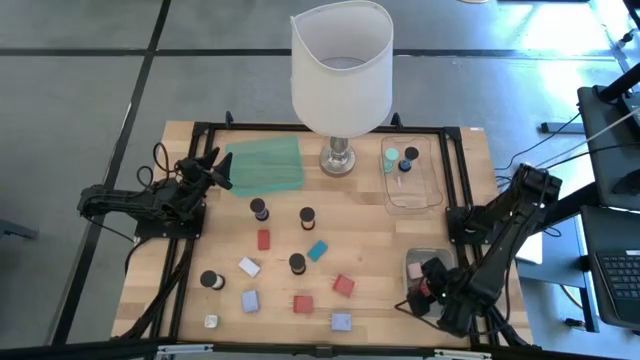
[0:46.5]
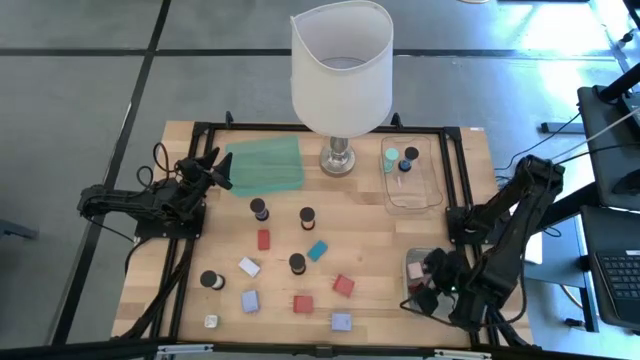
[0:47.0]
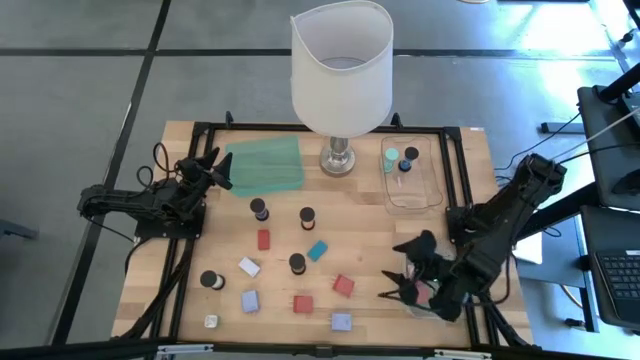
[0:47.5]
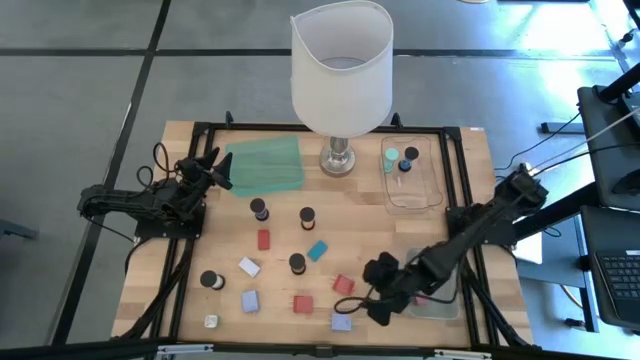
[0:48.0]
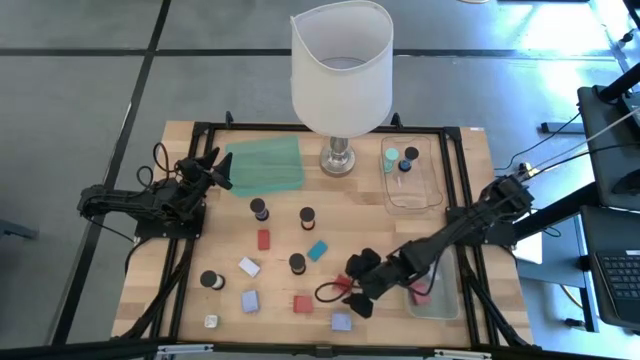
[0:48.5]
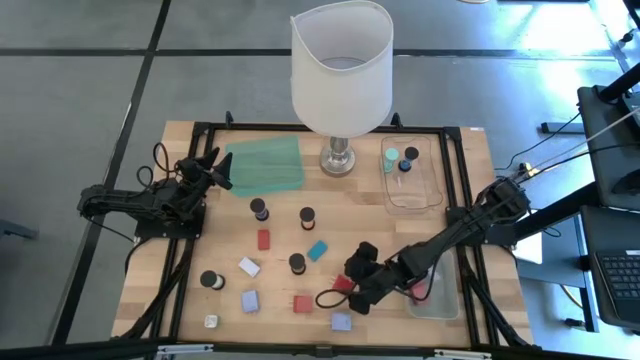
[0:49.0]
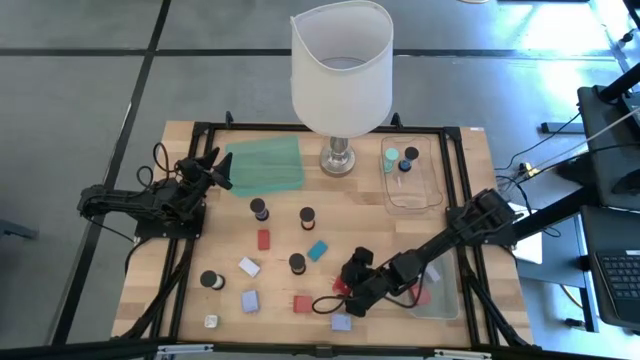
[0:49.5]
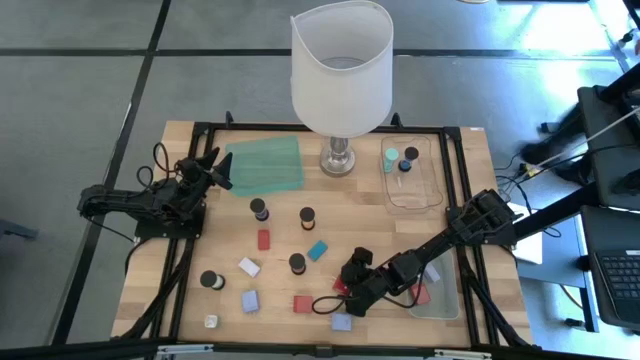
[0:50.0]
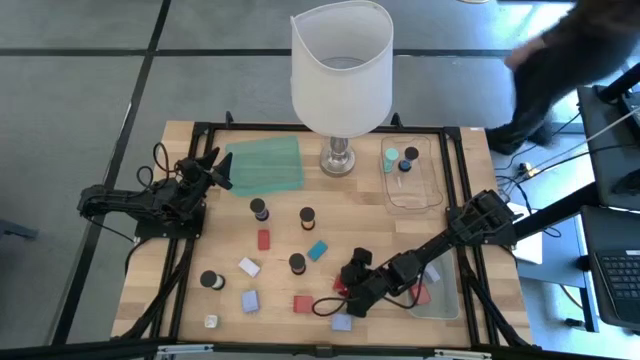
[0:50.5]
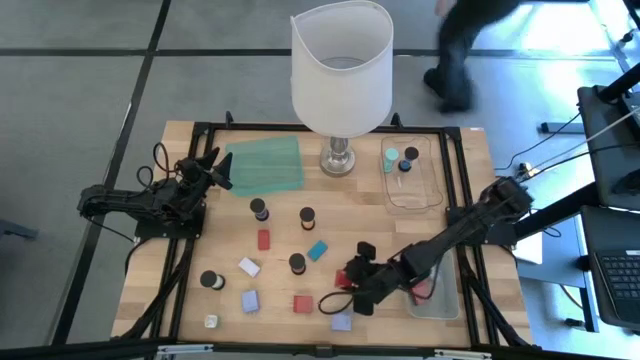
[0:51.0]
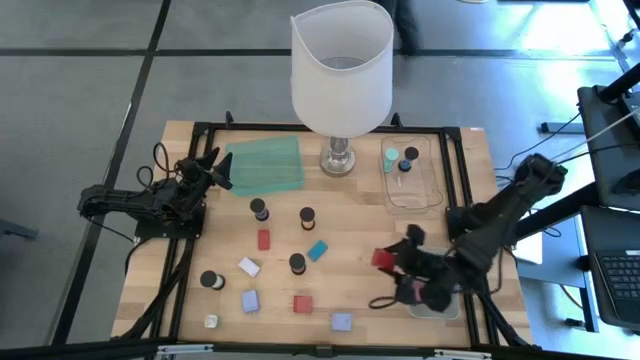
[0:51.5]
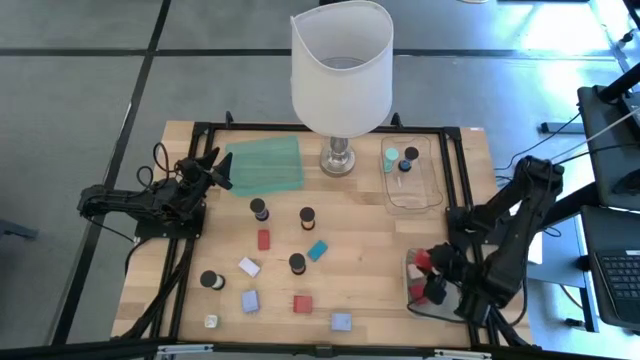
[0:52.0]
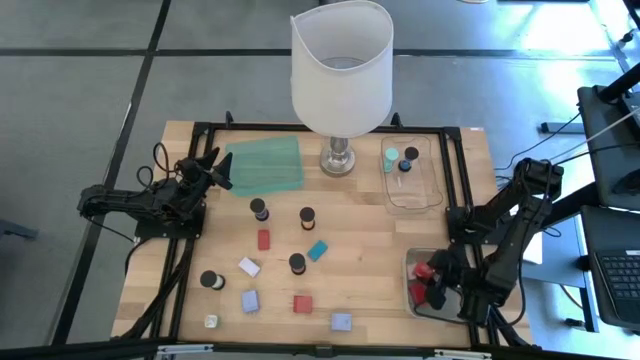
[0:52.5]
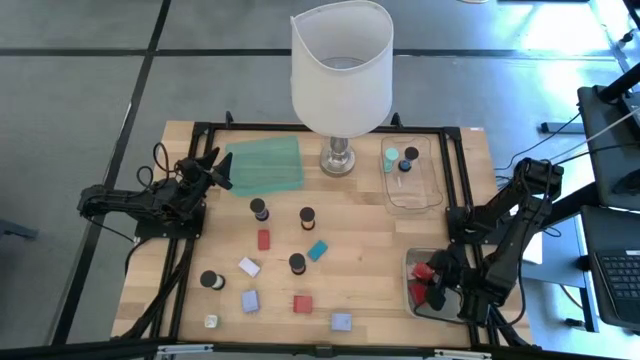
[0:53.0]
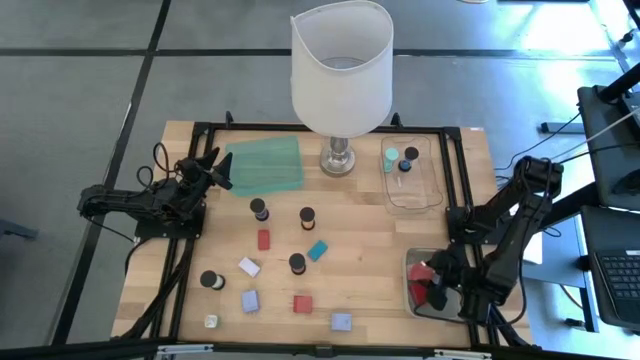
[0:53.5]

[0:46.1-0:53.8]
Task: Pick & Place Office items
Put the top red charger adapter into the gray bin

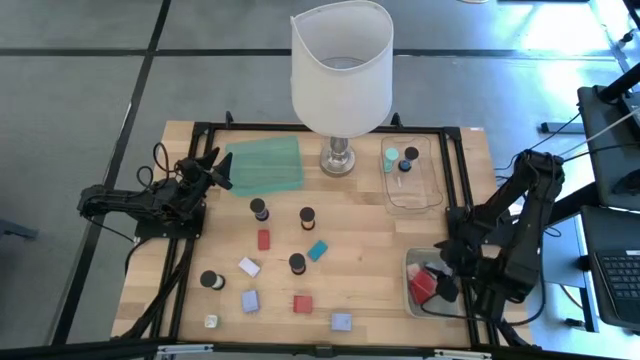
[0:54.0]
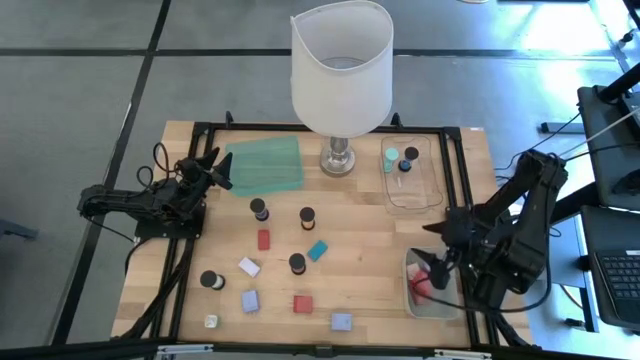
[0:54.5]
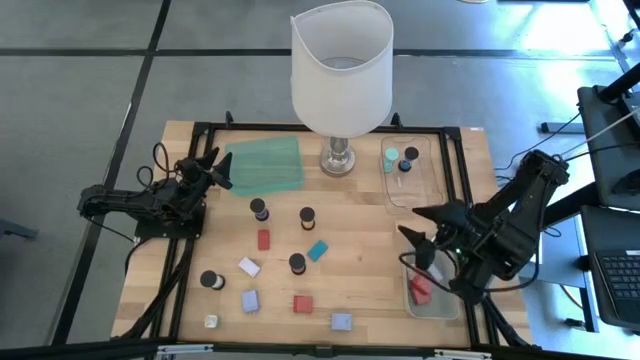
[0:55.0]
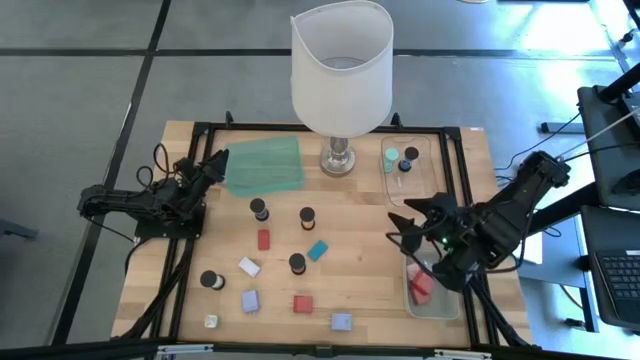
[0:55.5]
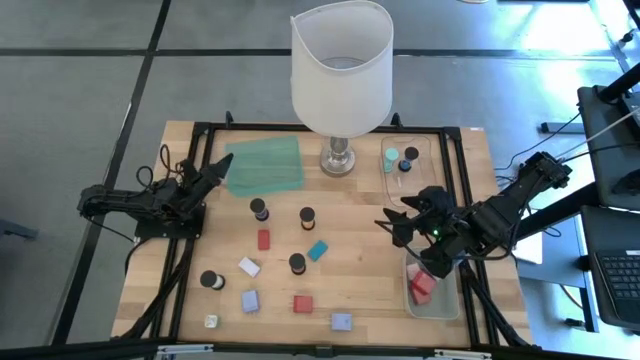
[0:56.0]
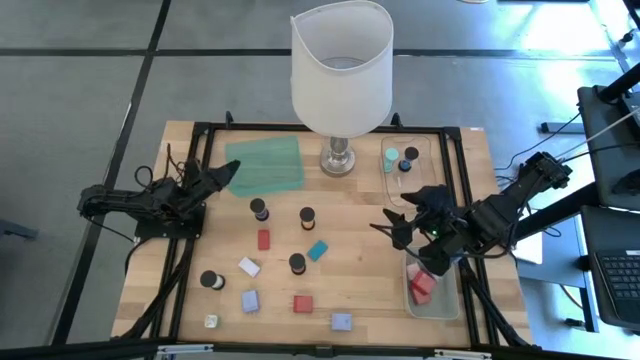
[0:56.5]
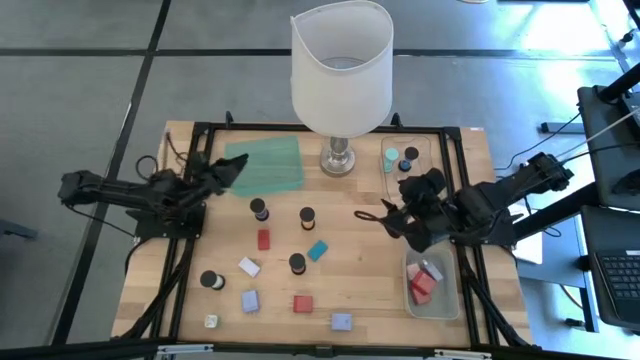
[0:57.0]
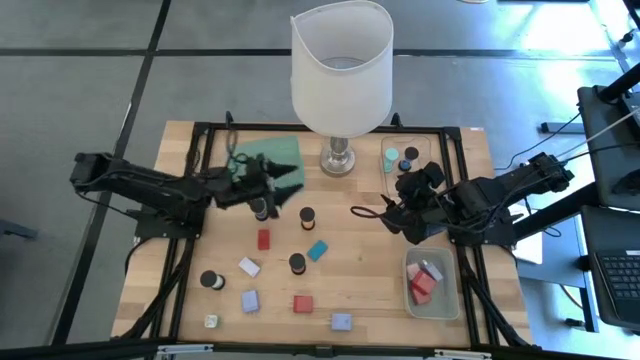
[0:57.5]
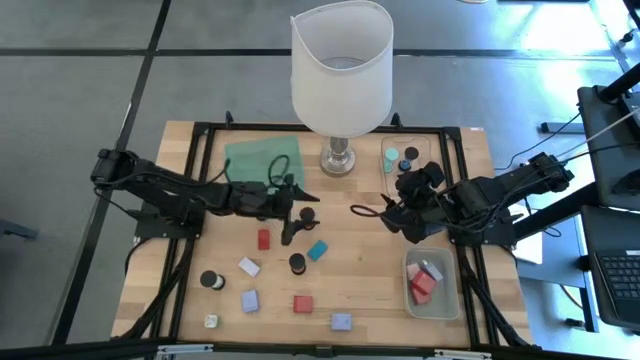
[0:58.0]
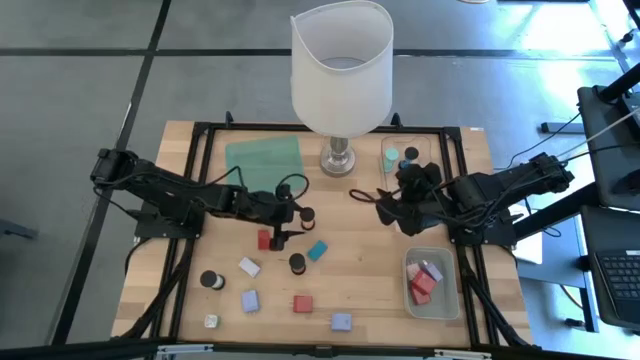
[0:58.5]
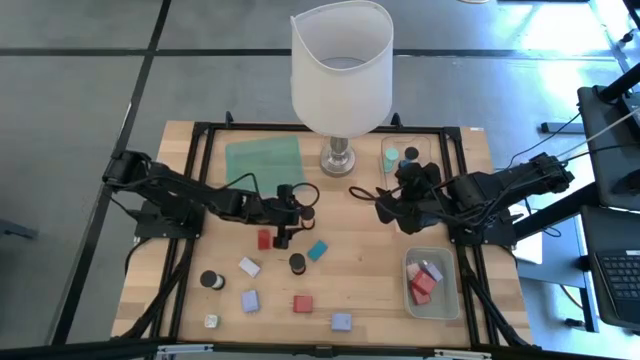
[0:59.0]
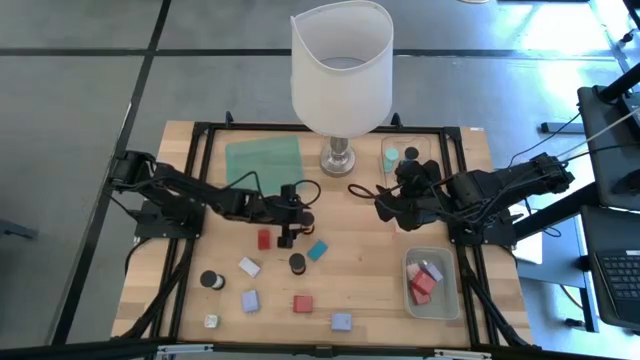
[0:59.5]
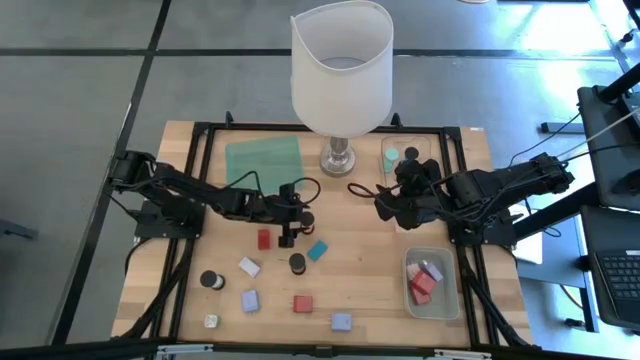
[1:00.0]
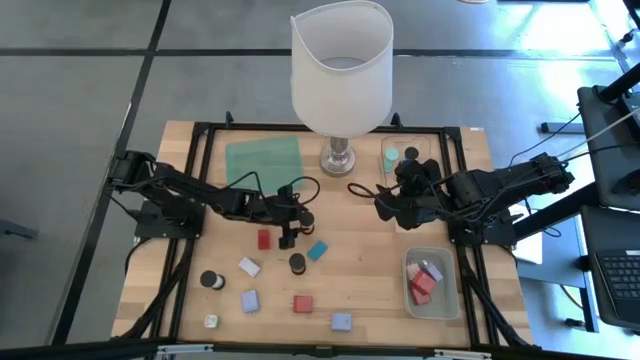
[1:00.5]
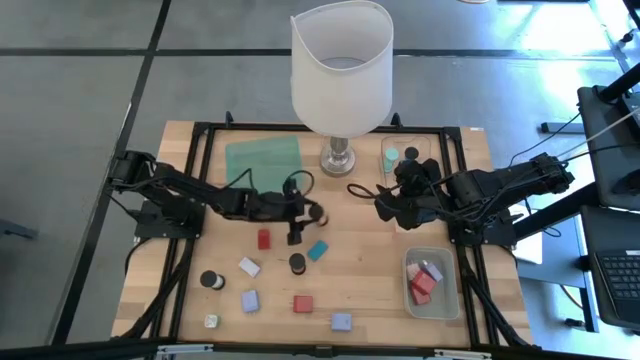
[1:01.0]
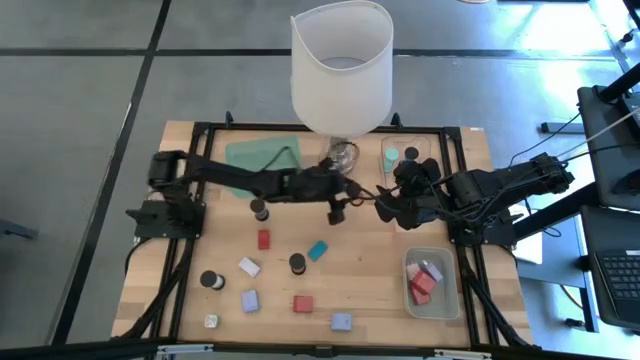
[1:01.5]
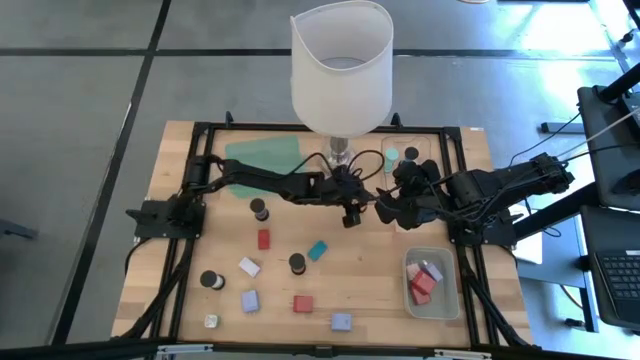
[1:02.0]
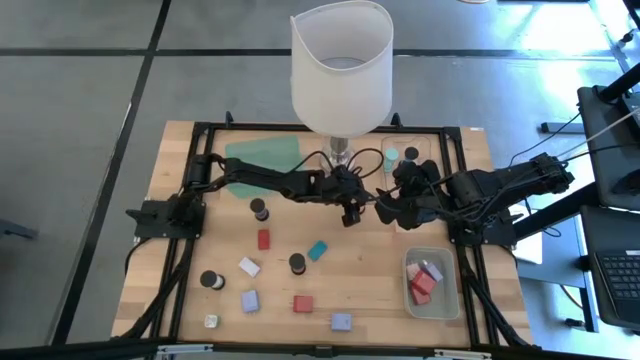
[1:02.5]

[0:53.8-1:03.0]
Move the yellow hourglass to the center of the table

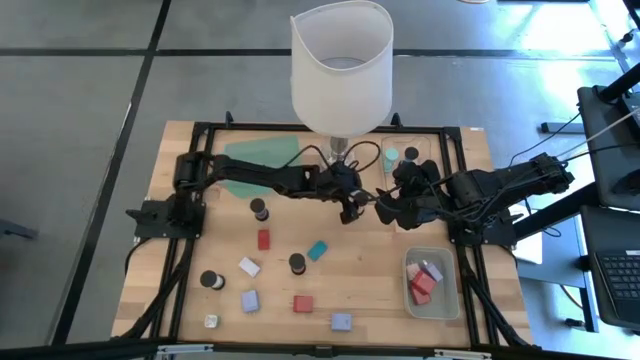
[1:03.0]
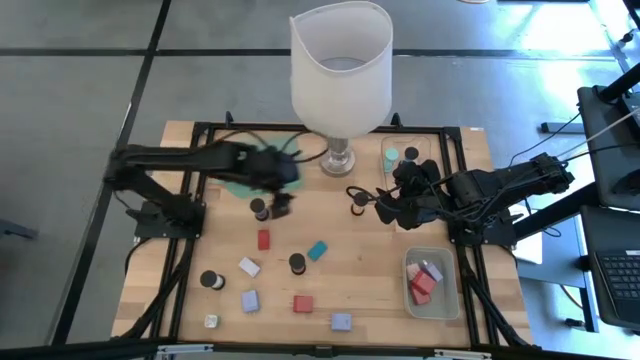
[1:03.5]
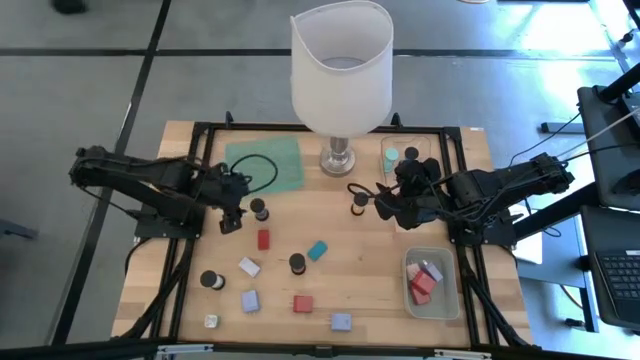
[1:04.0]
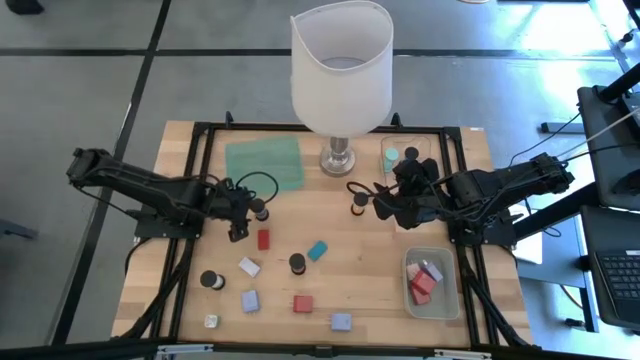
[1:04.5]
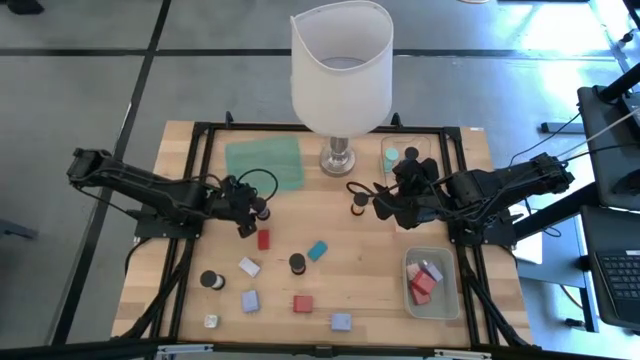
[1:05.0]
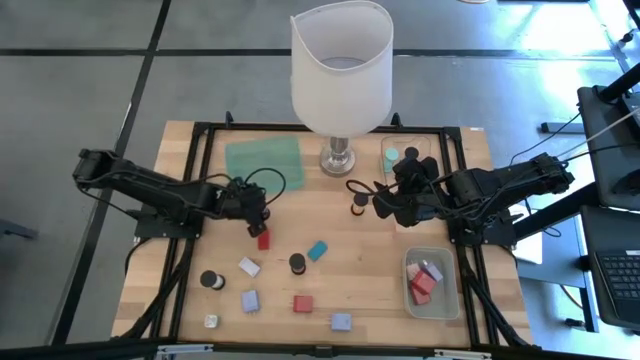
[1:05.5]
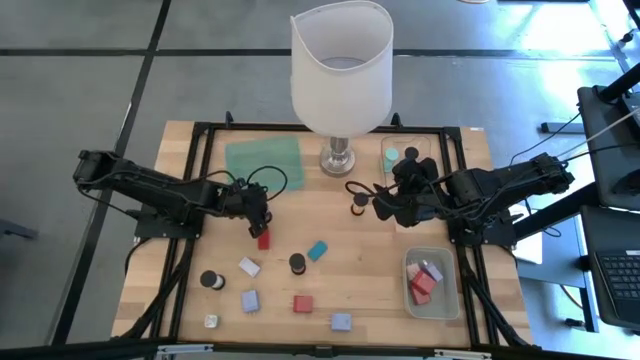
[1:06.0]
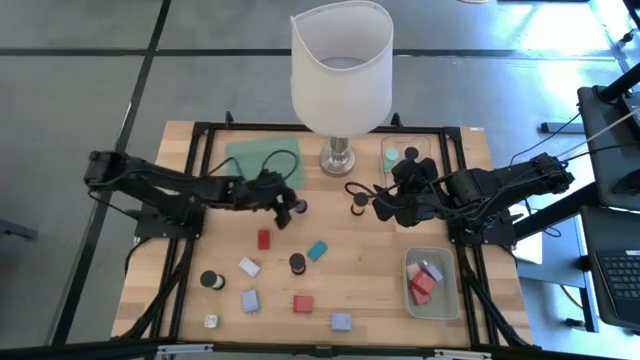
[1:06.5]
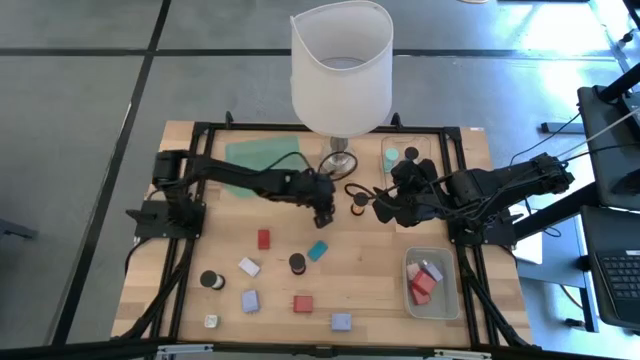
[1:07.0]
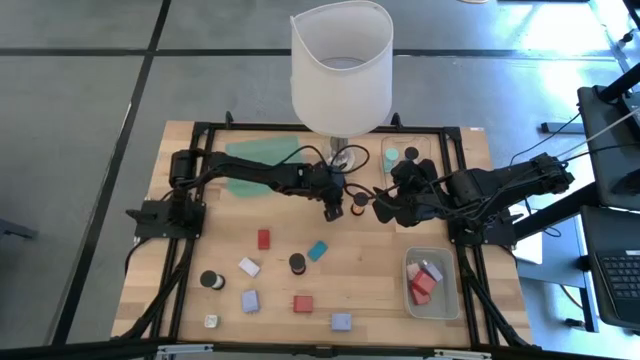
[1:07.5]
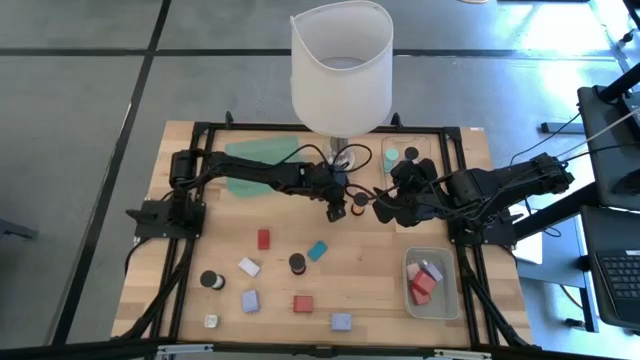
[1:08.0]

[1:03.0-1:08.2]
Move the blue hourglass to the center of the table
